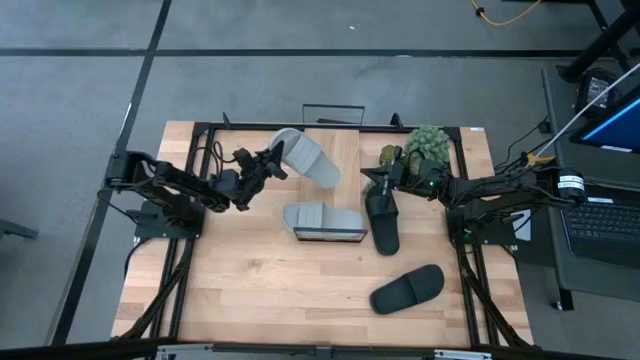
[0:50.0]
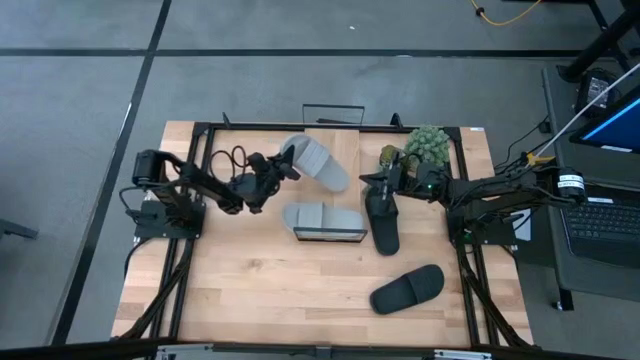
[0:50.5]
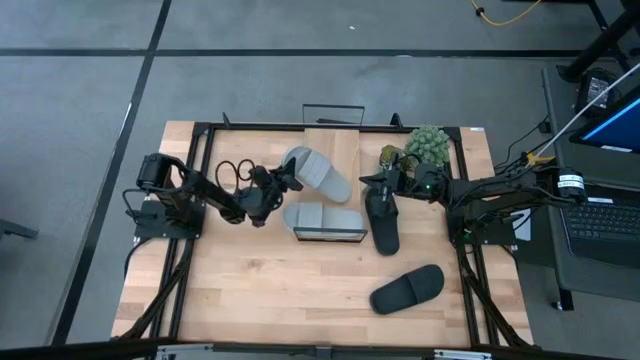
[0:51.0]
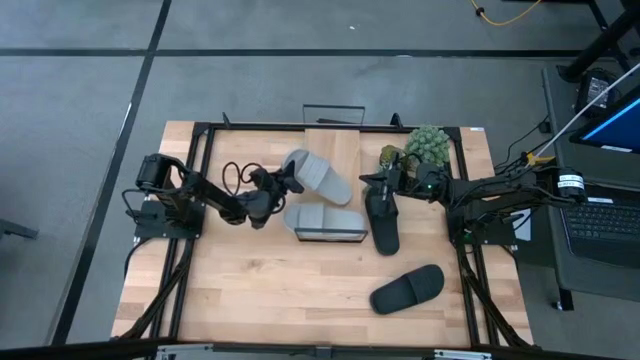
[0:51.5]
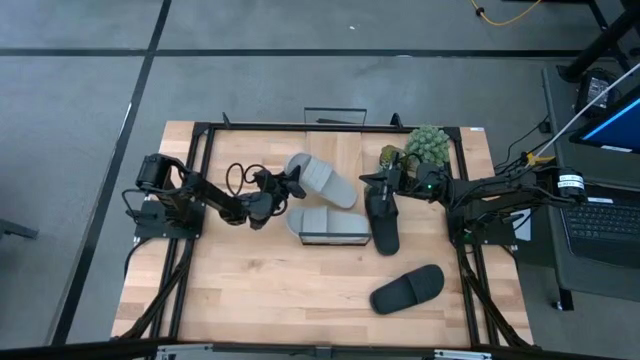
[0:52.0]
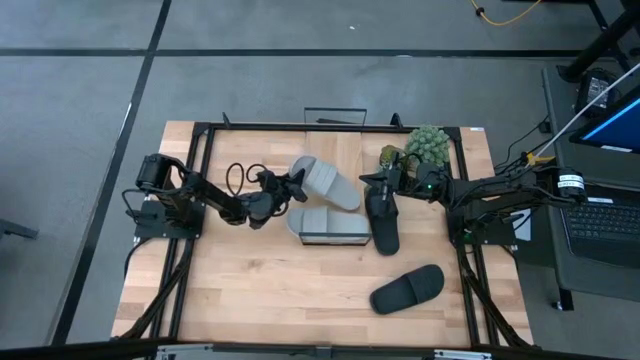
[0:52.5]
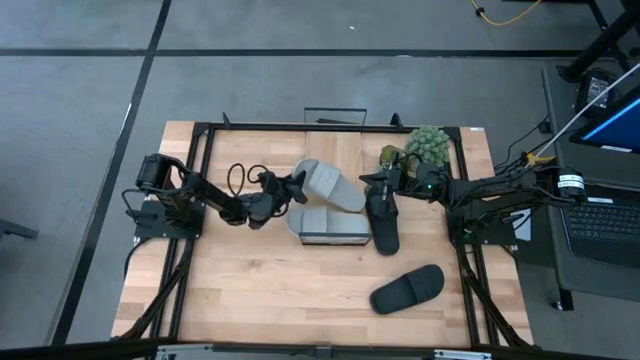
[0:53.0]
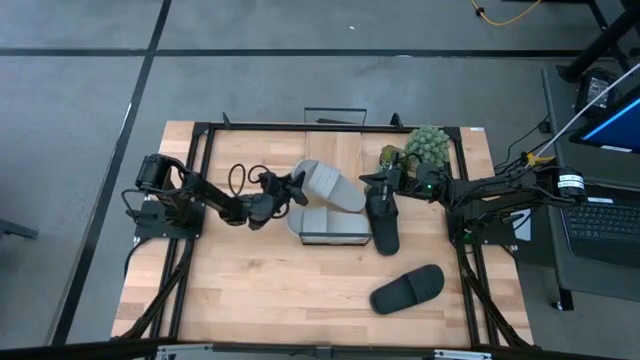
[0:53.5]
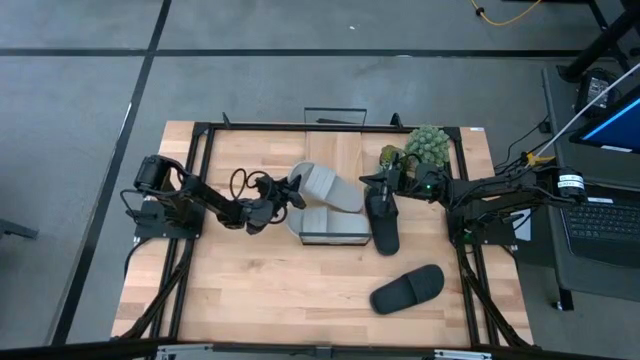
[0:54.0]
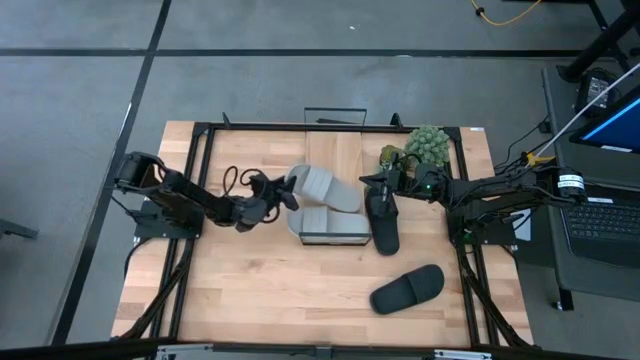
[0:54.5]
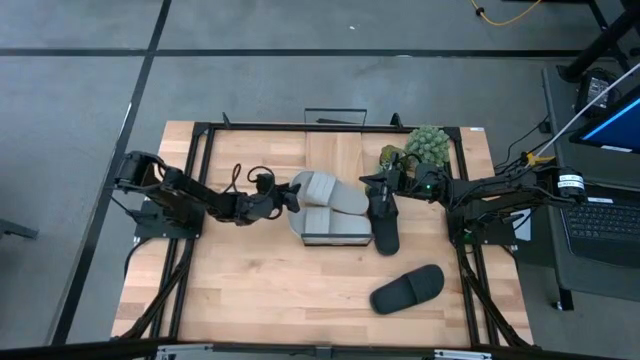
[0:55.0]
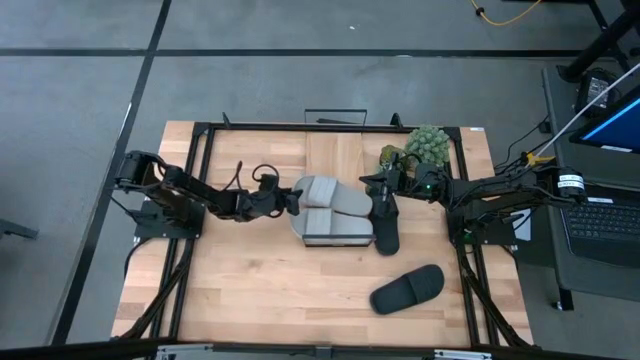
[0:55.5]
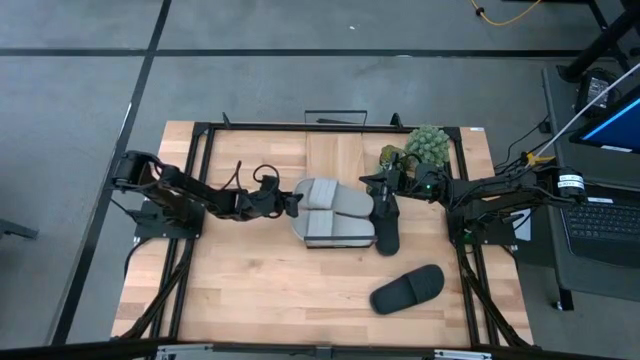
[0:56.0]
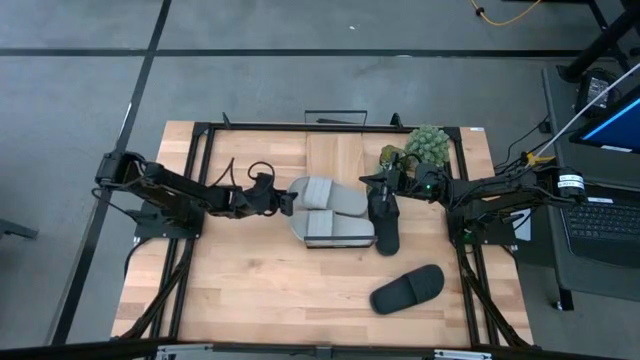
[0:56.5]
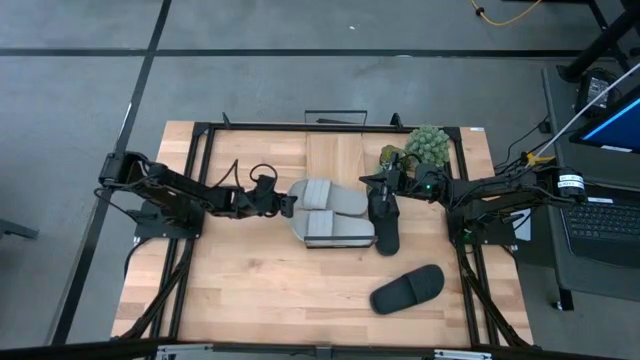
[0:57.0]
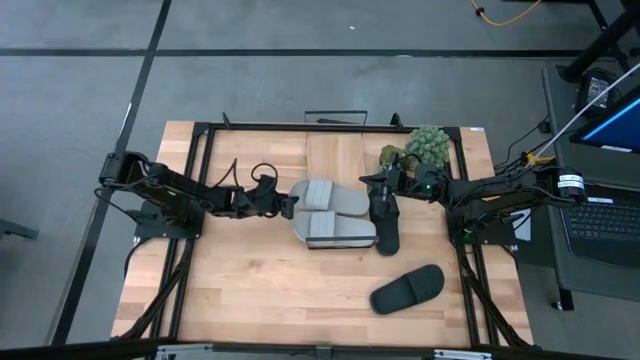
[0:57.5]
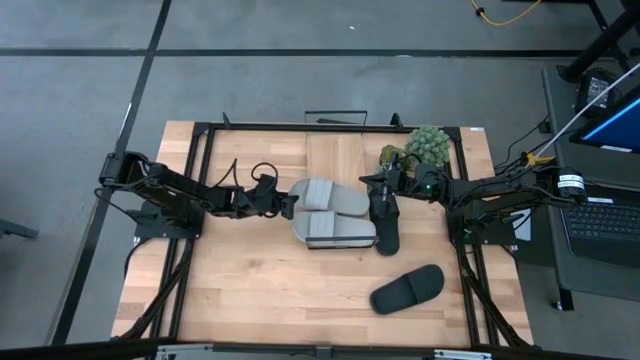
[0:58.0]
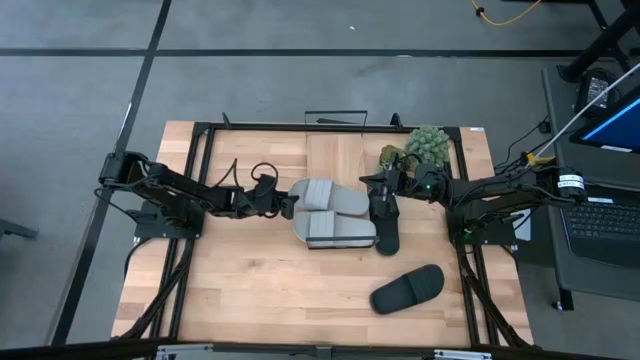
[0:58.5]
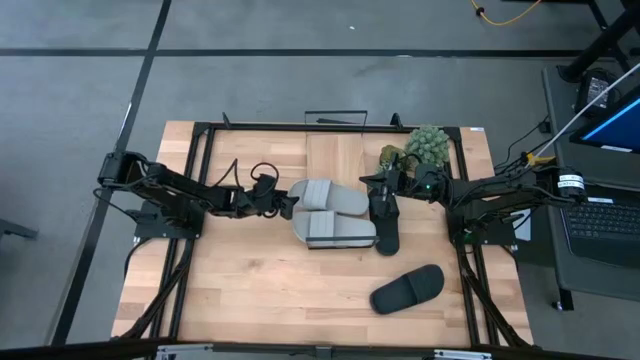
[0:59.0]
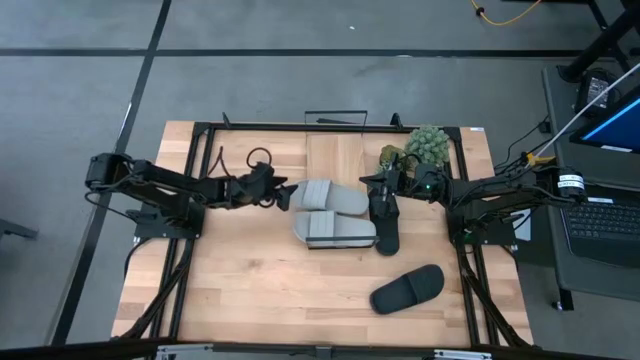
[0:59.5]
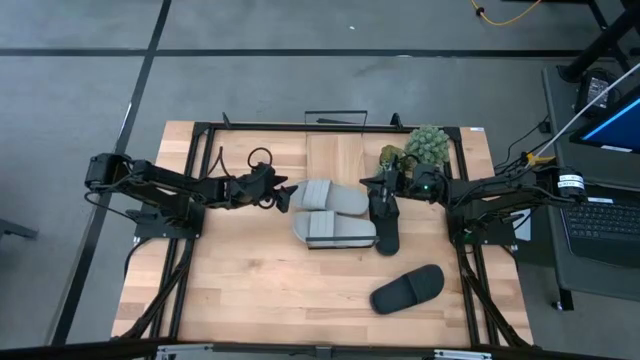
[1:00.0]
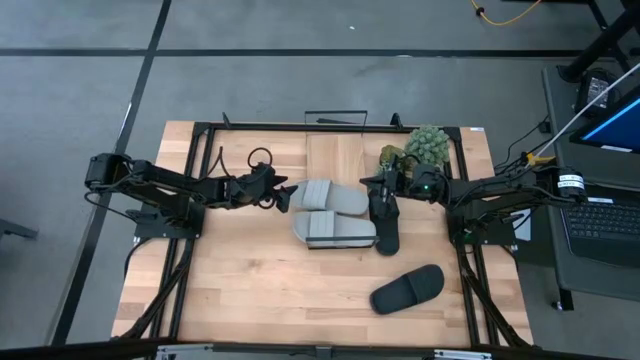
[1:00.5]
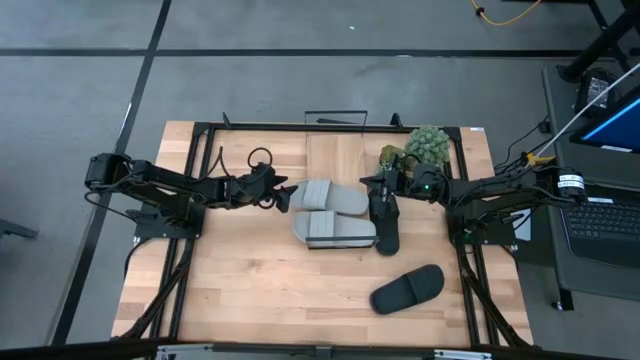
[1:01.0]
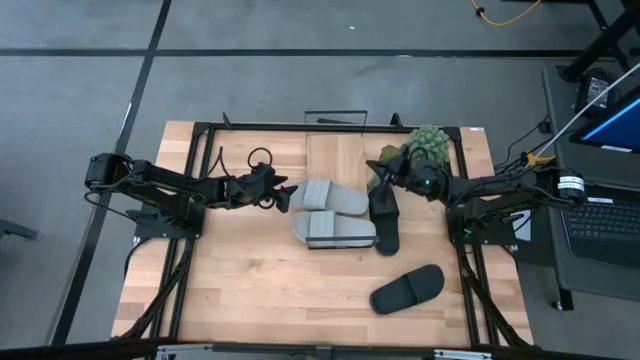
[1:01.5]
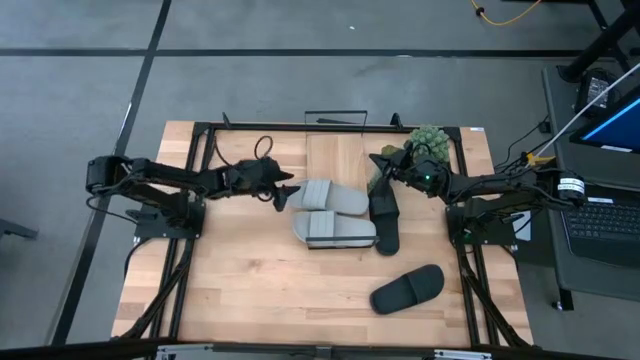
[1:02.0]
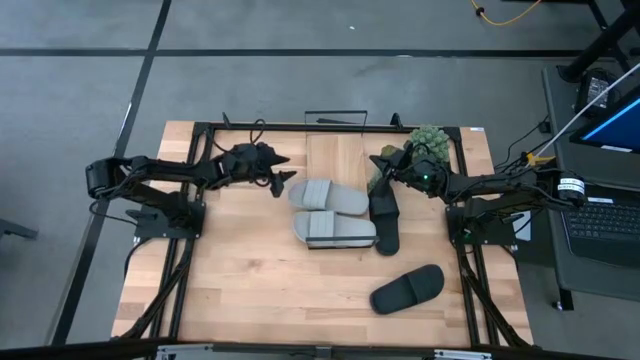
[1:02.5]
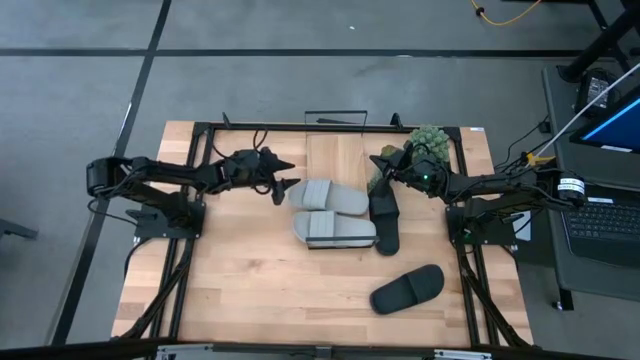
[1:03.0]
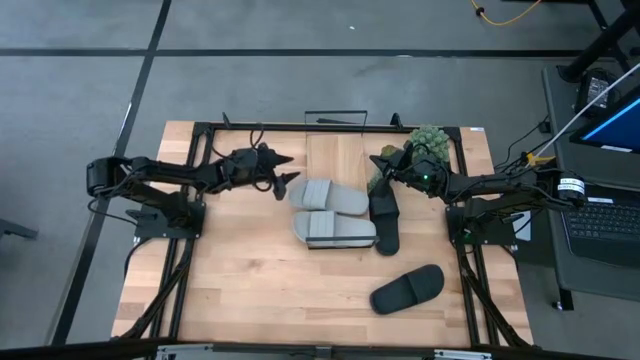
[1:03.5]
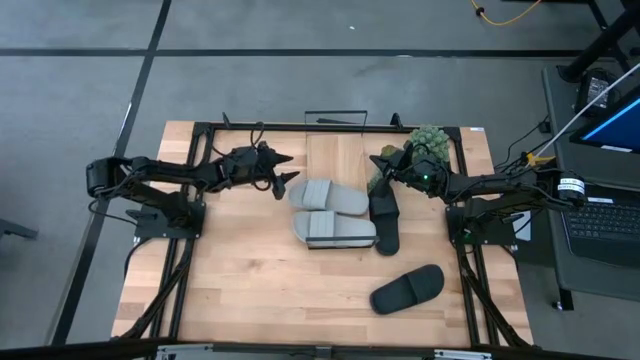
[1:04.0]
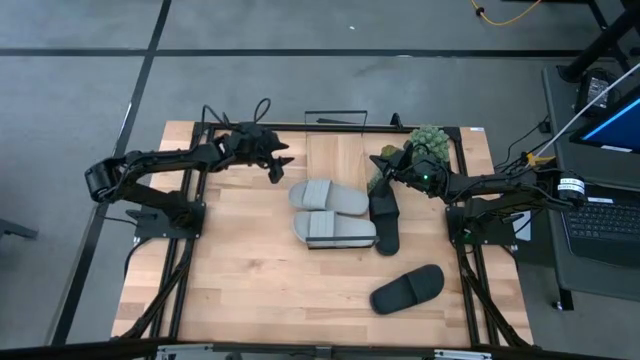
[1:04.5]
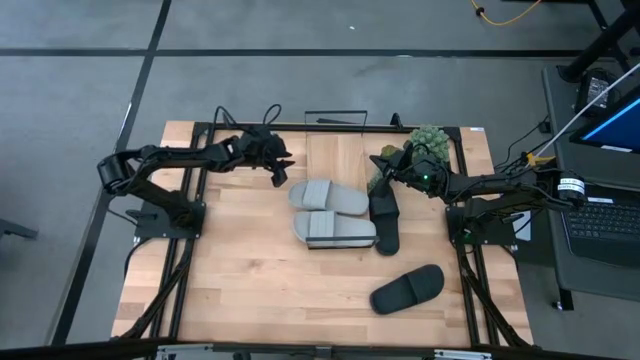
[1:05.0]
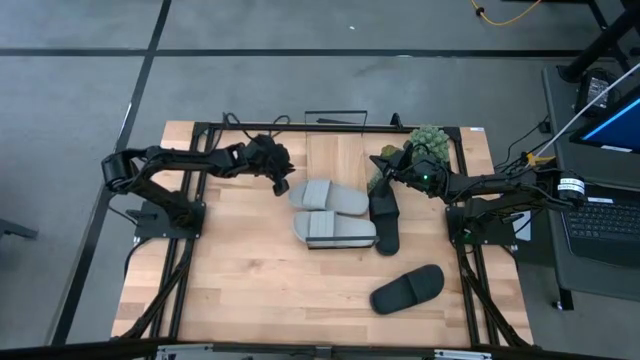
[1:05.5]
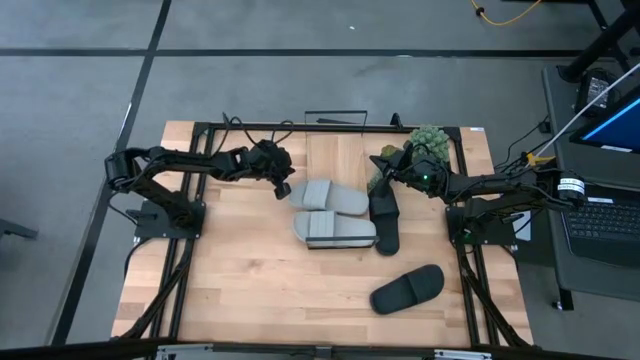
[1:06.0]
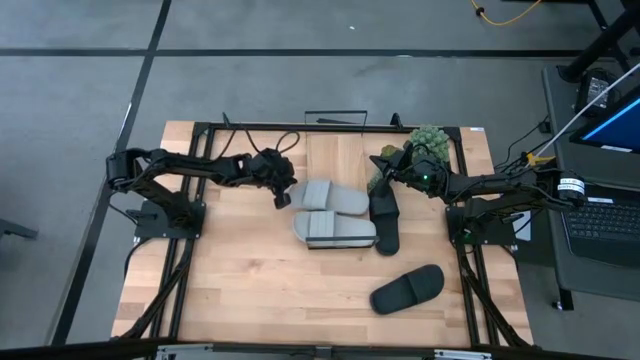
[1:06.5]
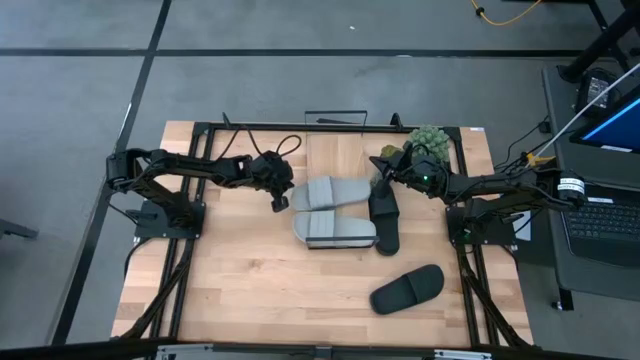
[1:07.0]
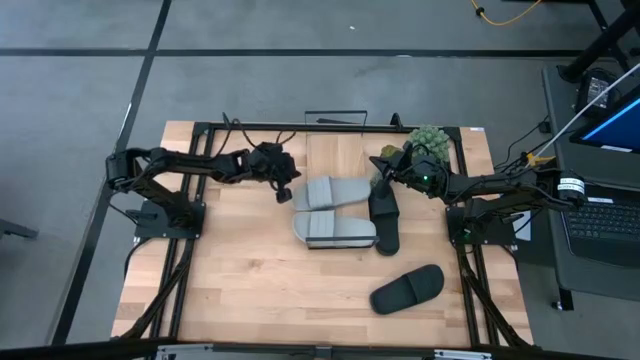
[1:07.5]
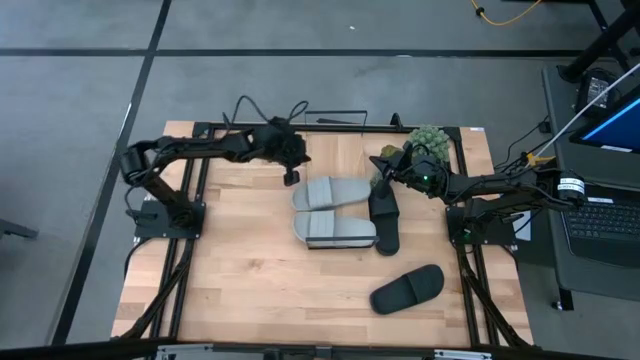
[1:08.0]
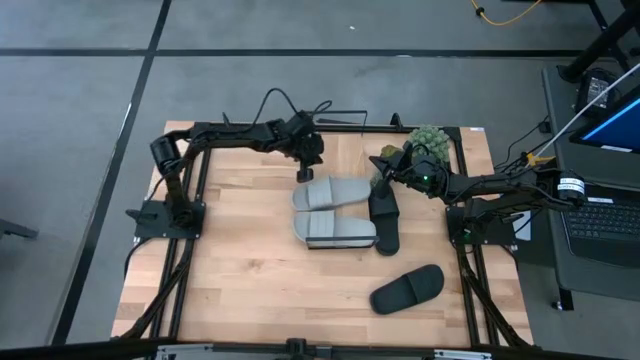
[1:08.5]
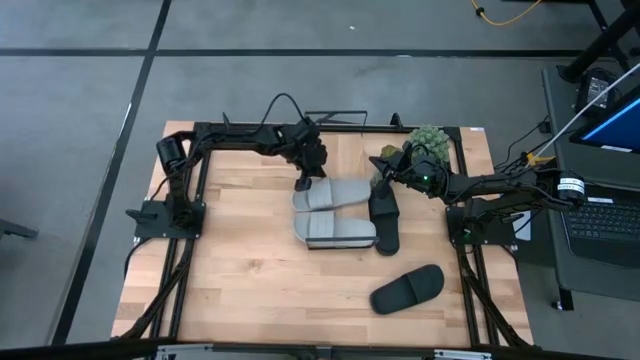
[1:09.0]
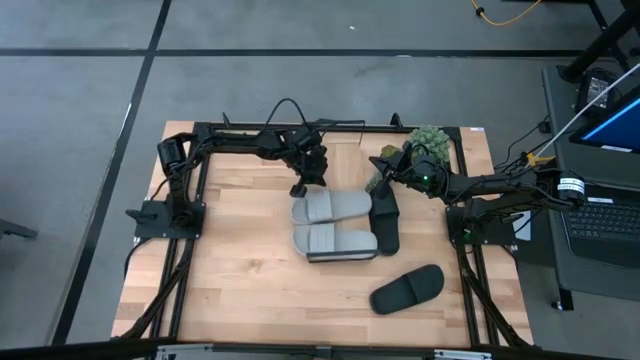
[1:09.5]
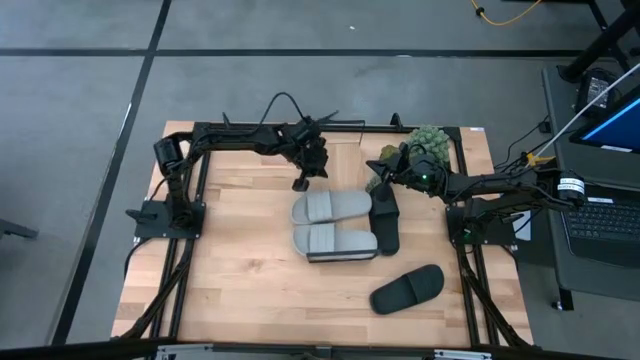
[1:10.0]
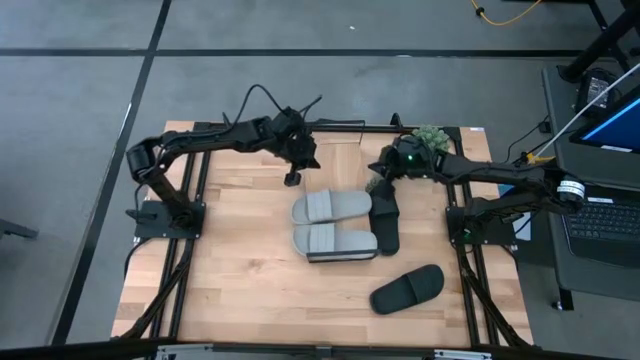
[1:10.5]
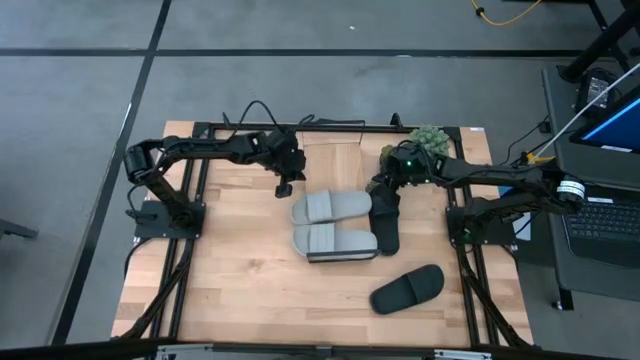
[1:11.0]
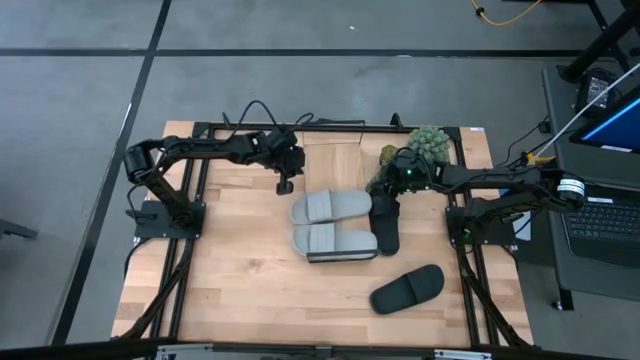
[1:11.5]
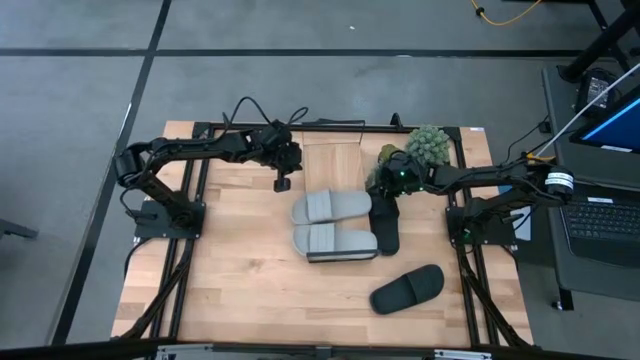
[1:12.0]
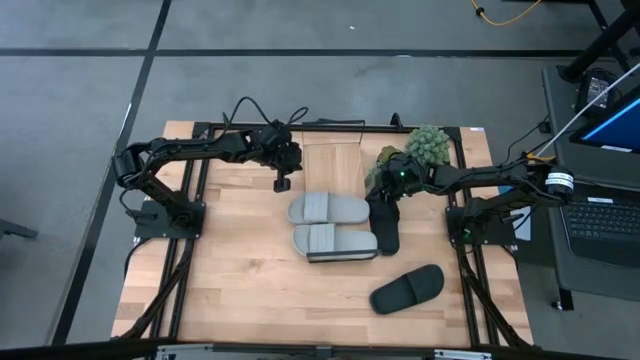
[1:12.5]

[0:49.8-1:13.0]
Task: Pick and place slides into the shelf
Put the gray slipper on the shelf
